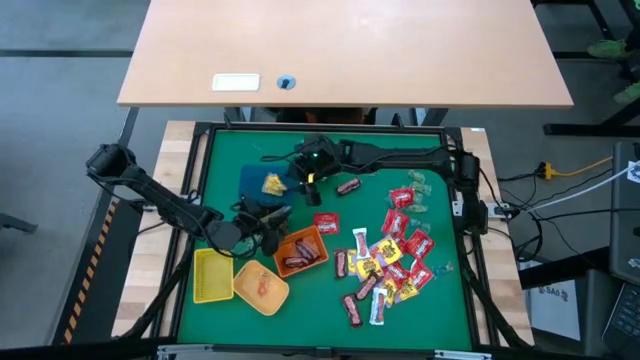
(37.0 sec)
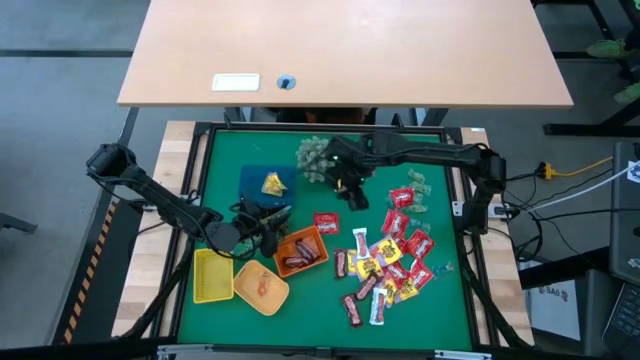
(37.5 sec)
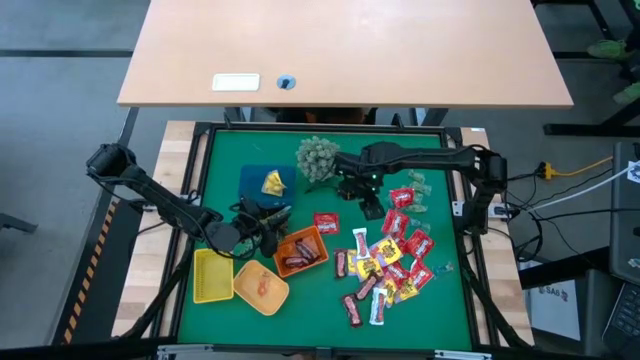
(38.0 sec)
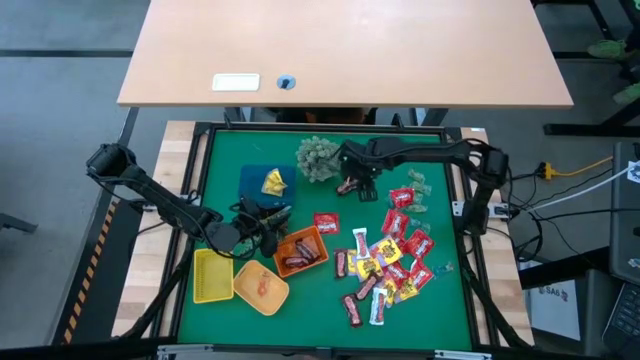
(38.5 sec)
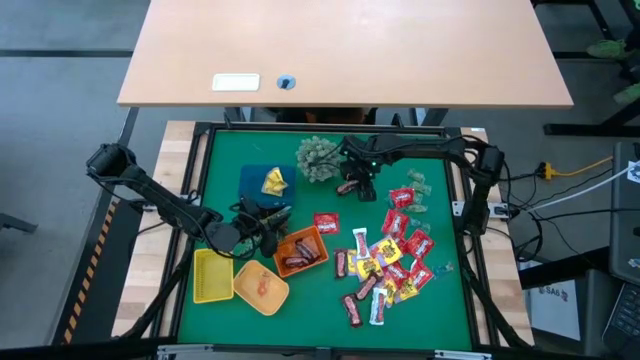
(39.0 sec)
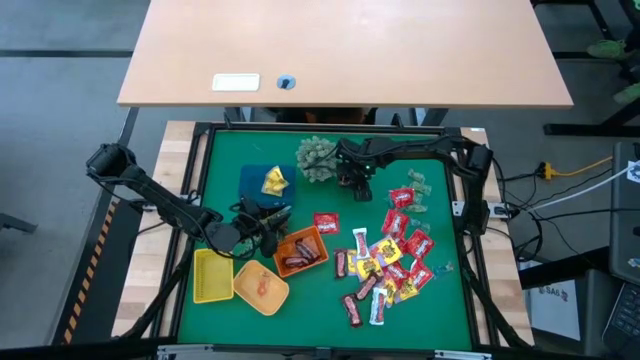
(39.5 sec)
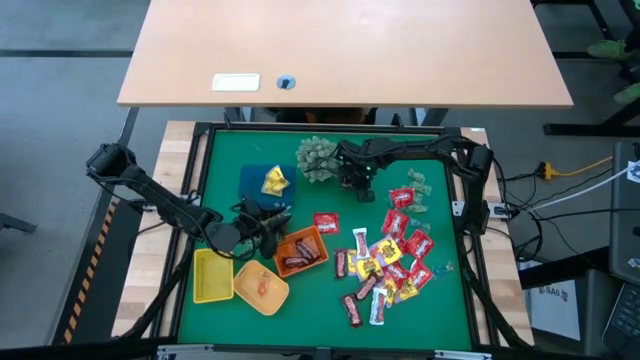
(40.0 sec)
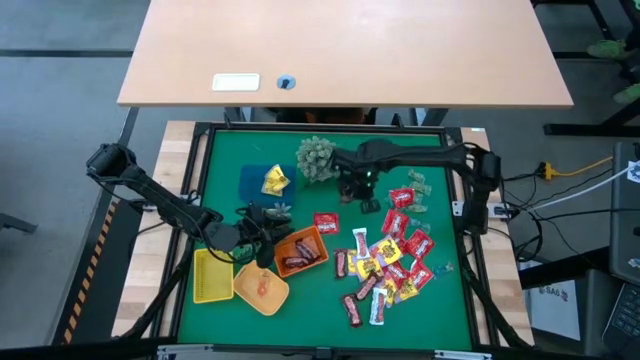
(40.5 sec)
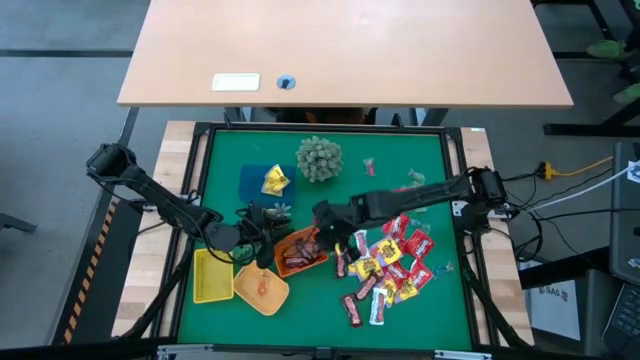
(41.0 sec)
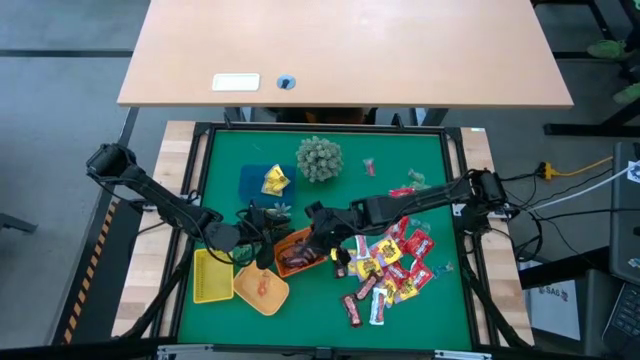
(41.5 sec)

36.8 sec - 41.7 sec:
Task: Sort candy
Put the brown chocolate into the orange bin

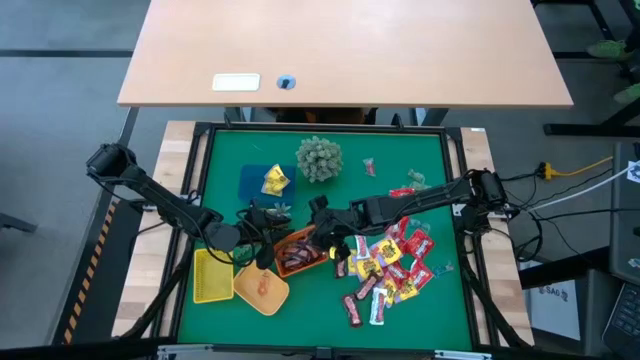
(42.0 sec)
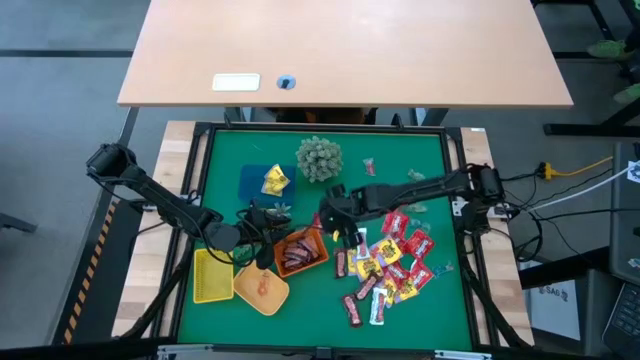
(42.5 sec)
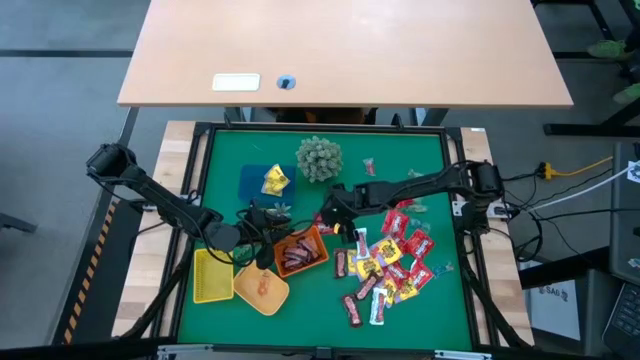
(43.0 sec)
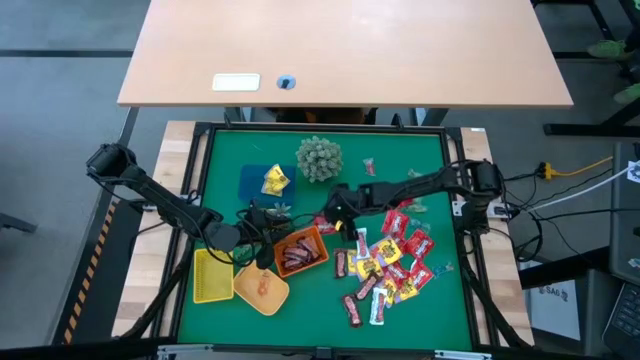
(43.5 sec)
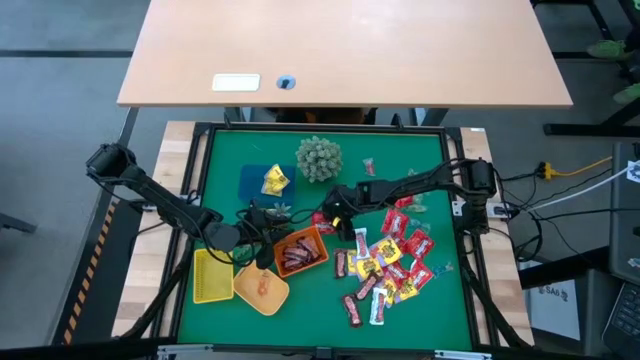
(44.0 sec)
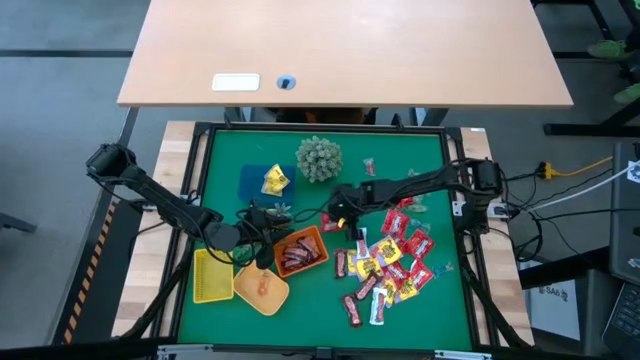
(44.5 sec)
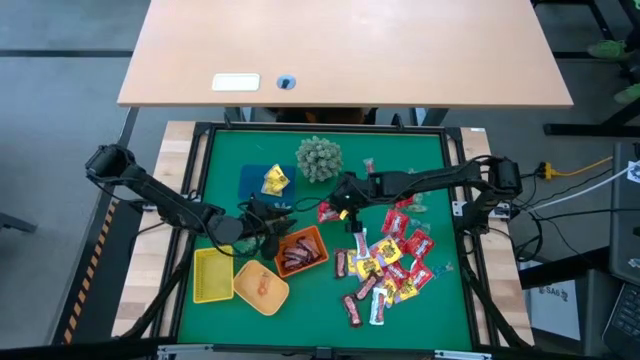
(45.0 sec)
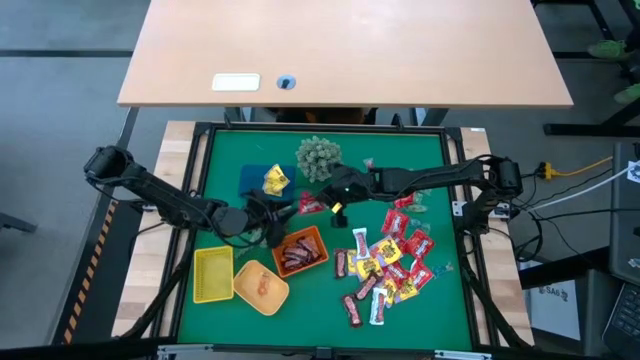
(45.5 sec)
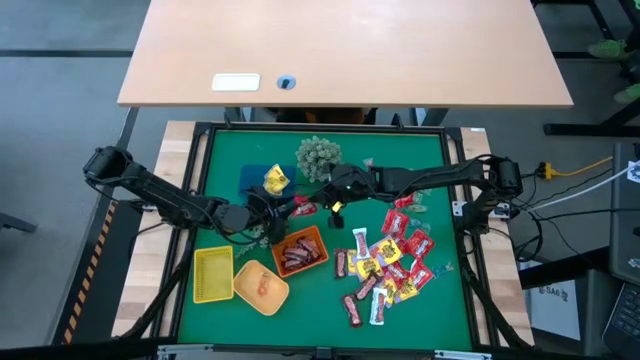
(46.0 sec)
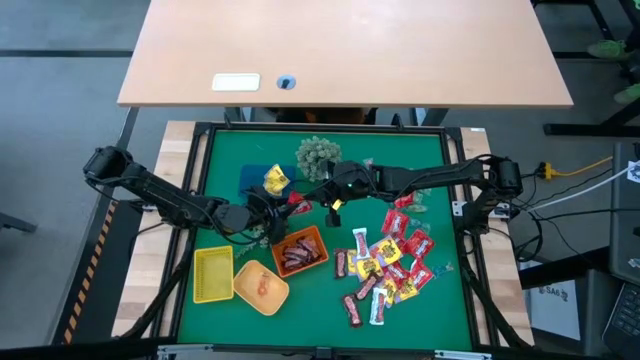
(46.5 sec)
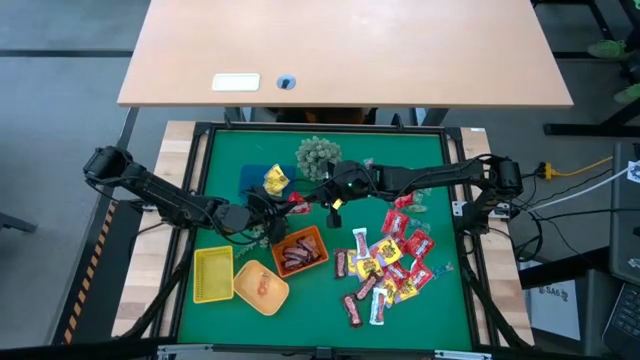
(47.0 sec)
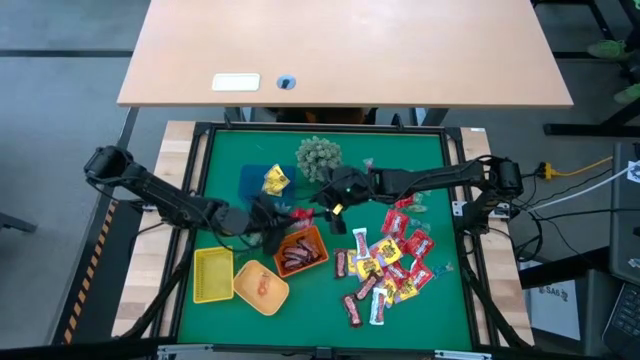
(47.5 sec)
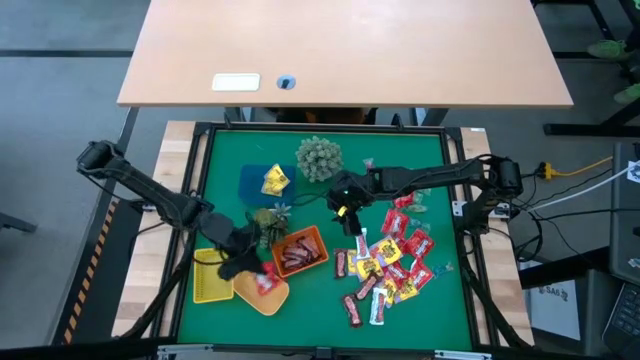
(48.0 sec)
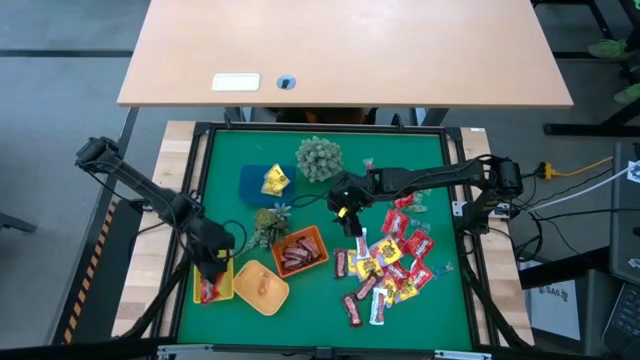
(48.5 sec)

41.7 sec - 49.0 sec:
Put the red candy into the yellow bin

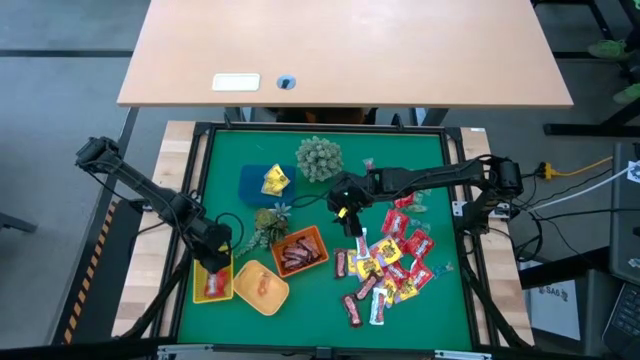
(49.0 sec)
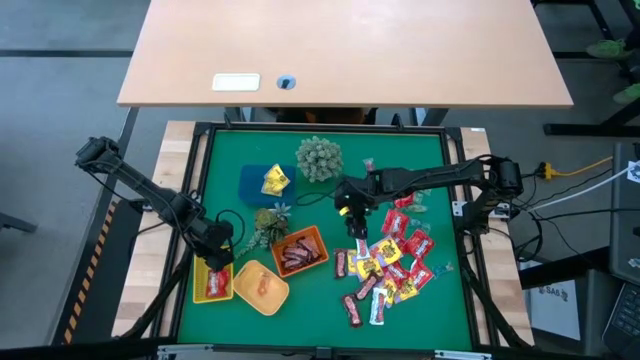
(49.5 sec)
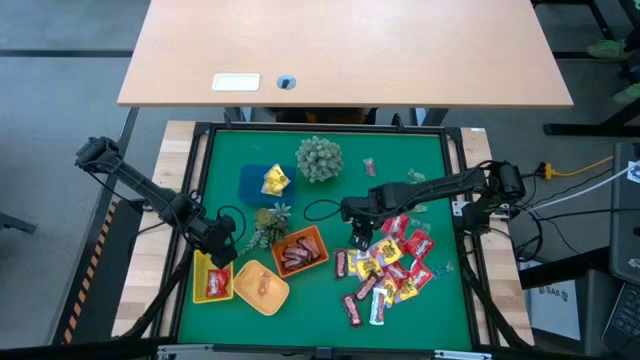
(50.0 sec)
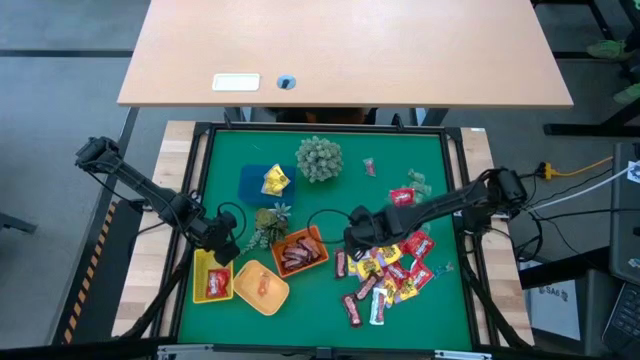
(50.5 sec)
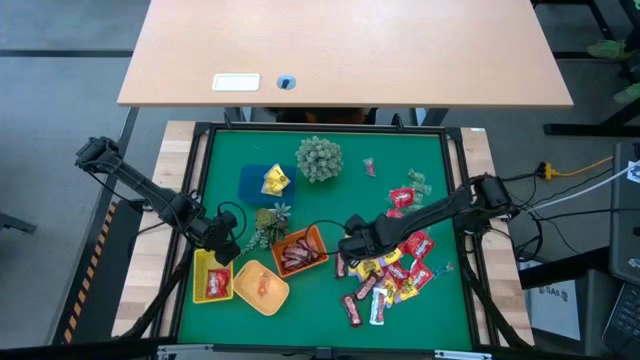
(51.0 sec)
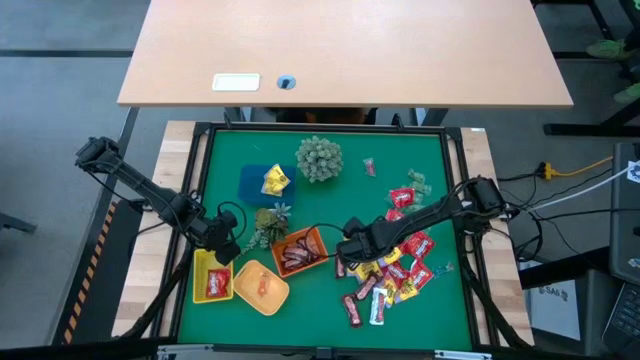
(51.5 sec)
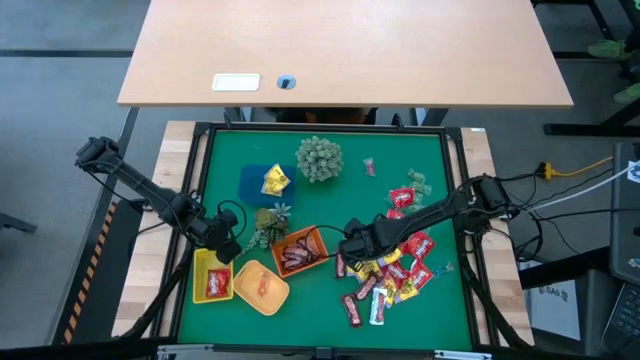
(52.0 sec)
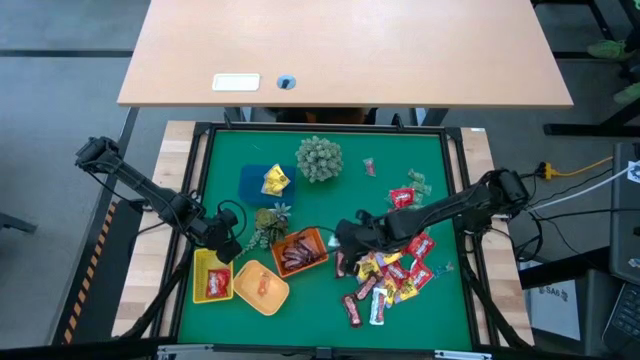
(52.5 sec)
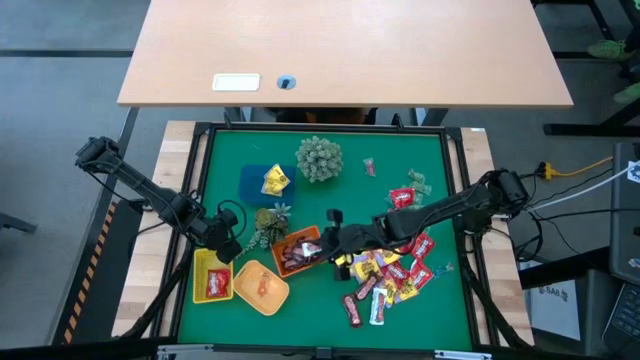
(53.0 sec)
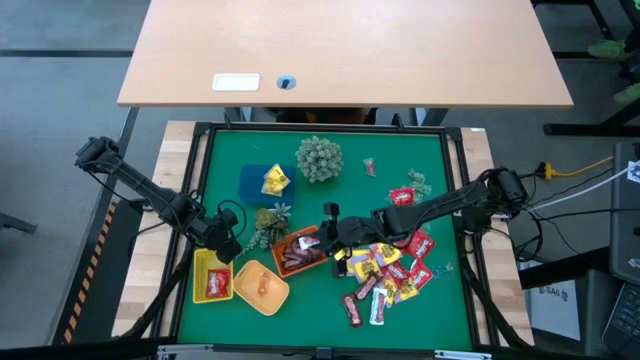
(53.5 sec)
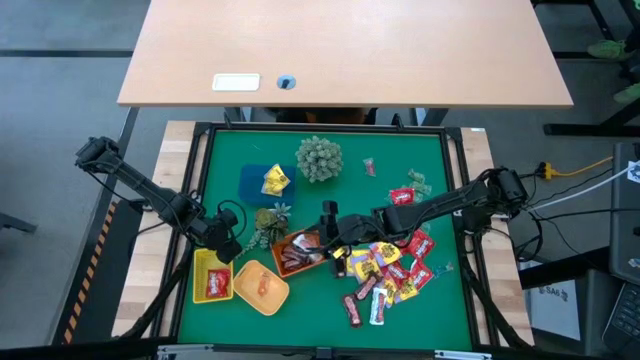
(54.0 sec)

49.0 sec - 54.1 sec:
Put the white chocolate into the orange bin

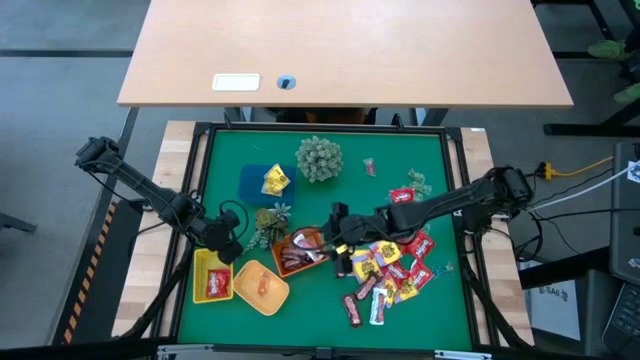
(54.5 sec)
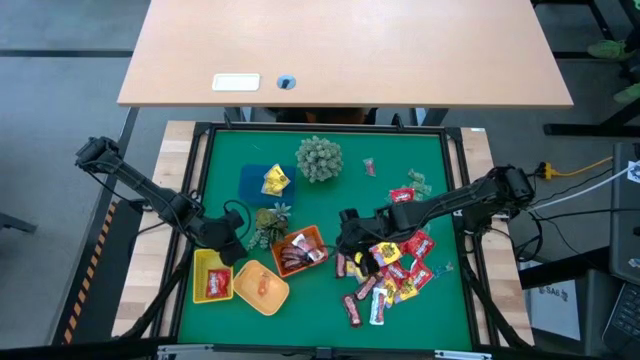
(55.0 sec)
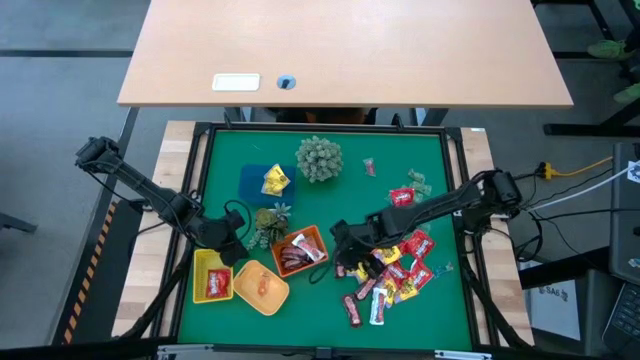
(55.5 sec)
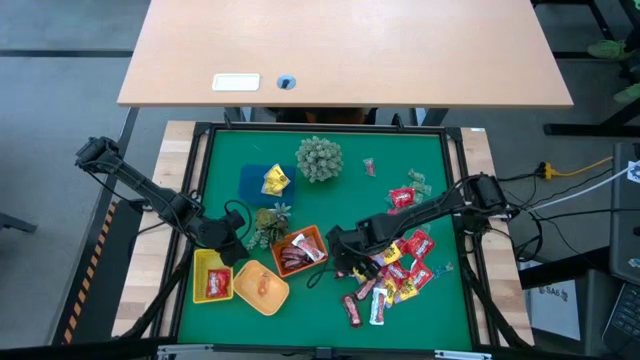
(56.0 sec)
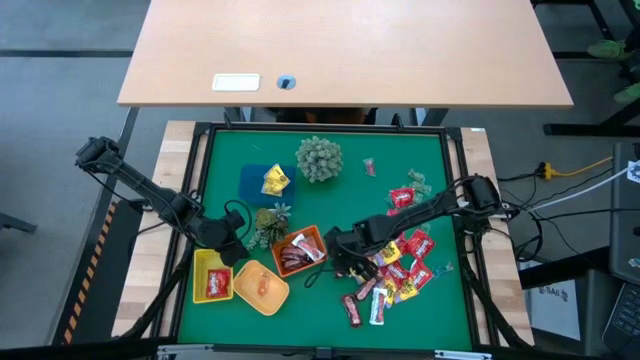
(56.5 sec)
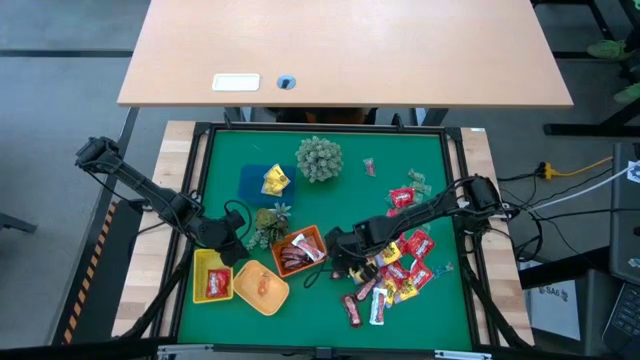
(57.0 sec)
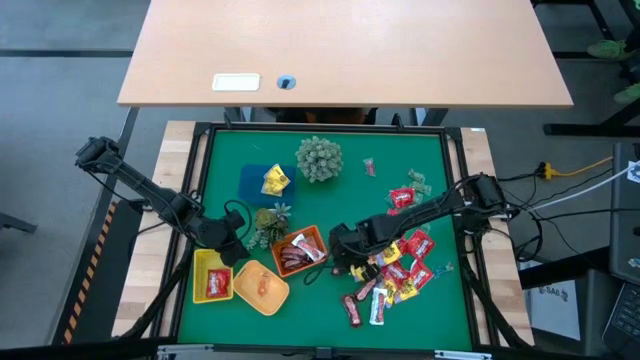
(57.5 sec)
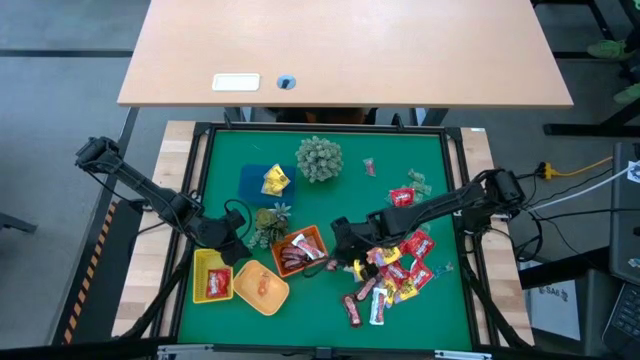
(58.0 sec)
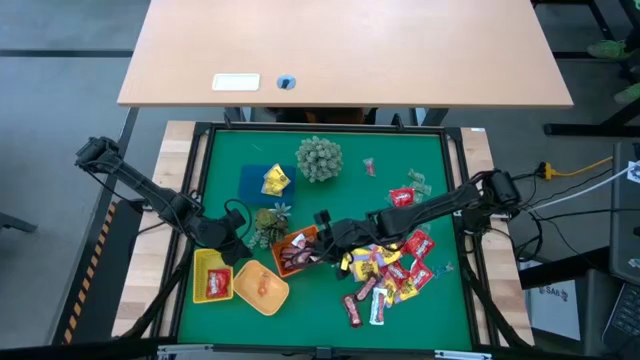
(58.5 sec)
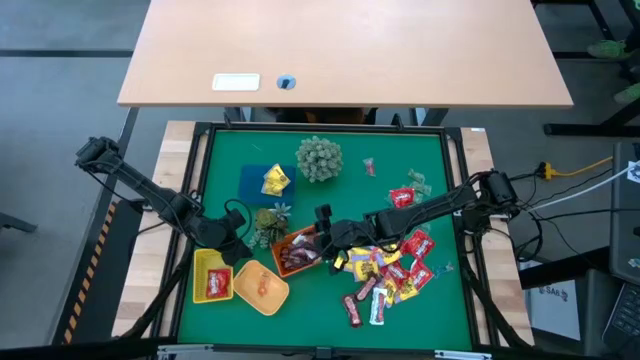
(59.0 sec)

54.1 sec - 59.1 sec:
Put the brown chocolate into the orange bin
